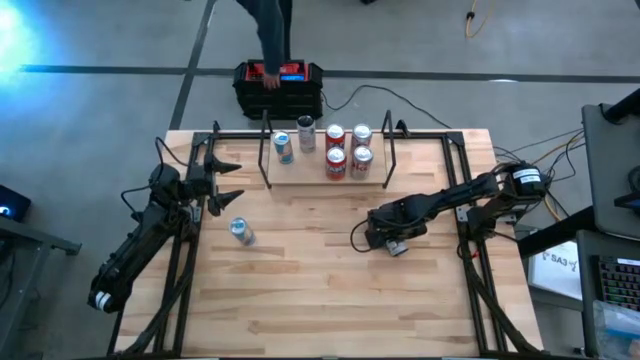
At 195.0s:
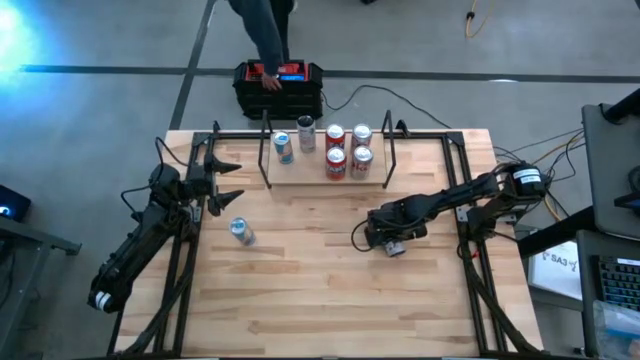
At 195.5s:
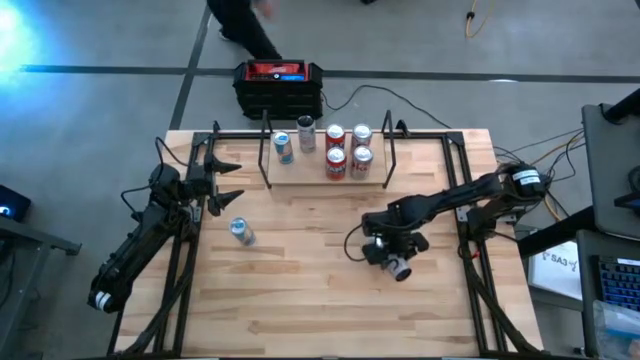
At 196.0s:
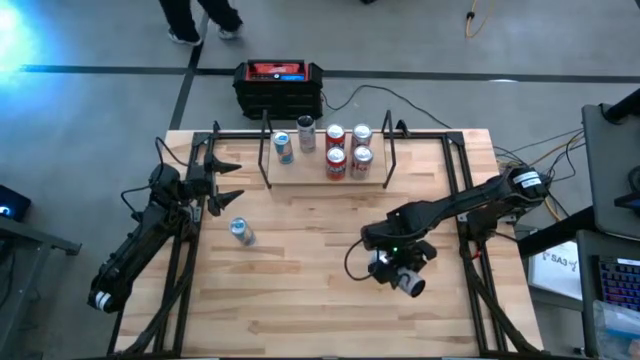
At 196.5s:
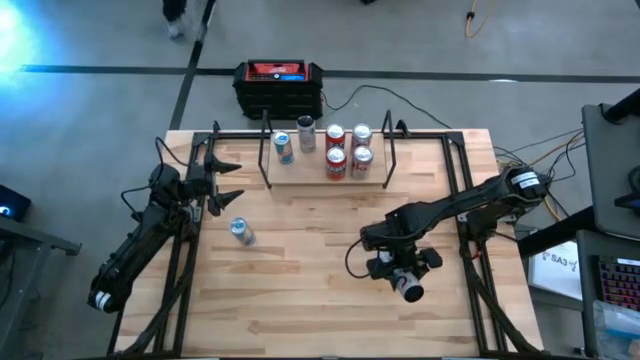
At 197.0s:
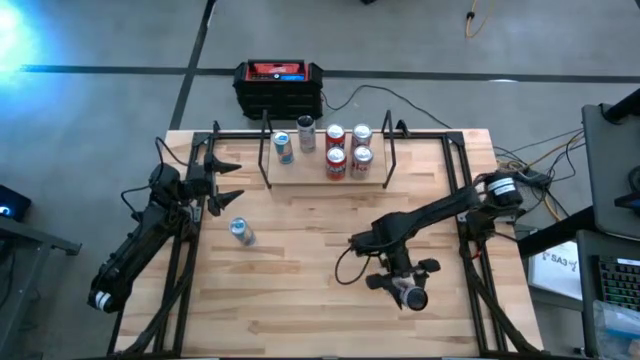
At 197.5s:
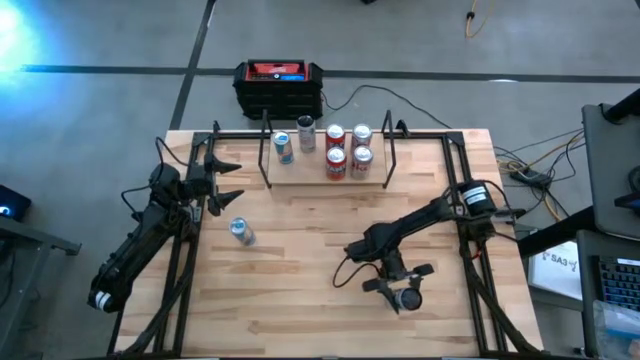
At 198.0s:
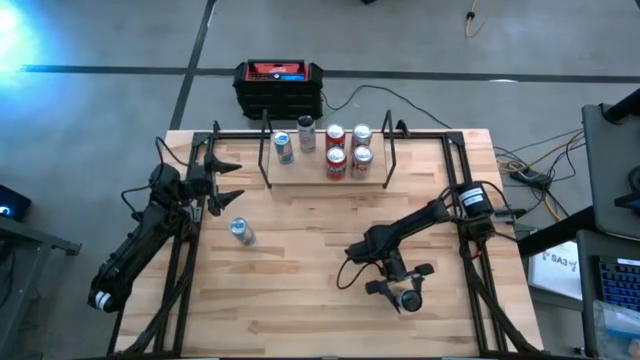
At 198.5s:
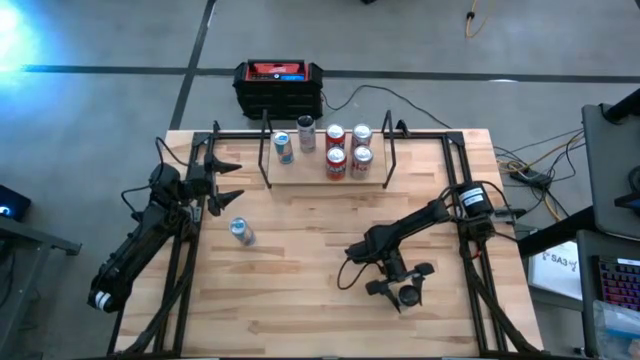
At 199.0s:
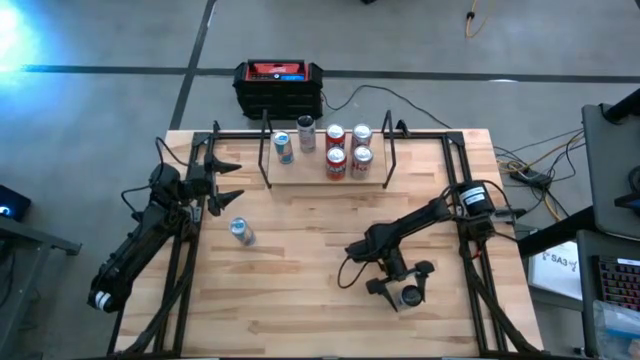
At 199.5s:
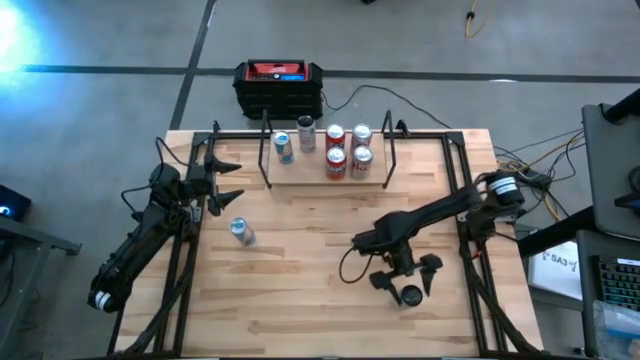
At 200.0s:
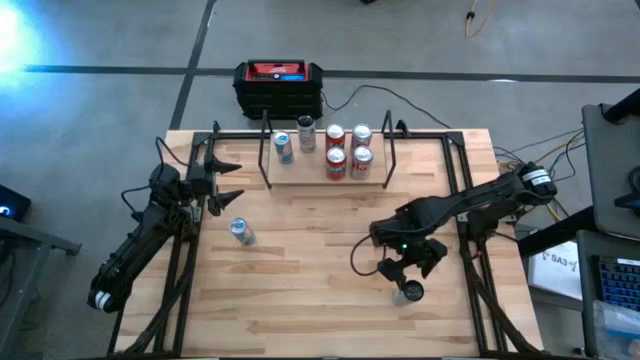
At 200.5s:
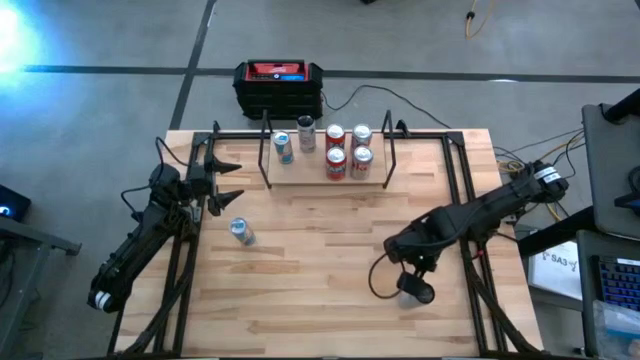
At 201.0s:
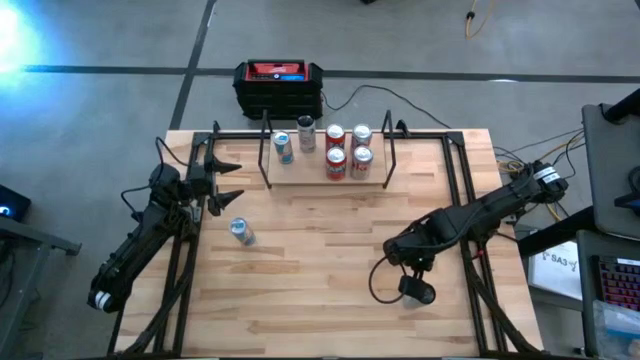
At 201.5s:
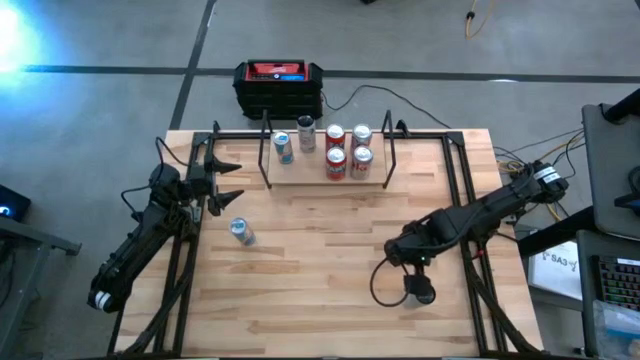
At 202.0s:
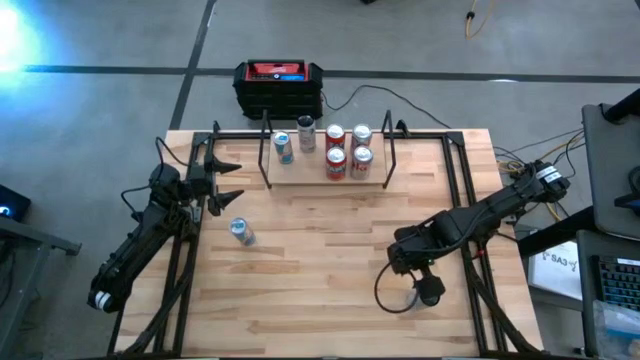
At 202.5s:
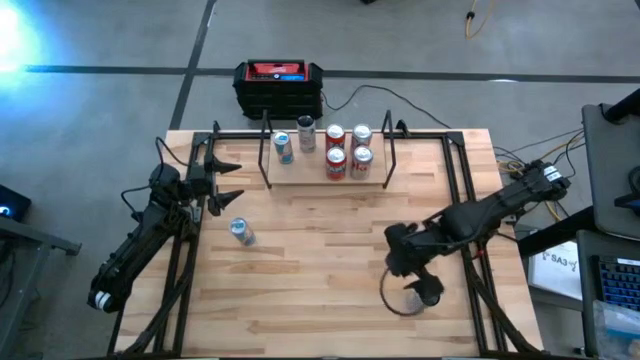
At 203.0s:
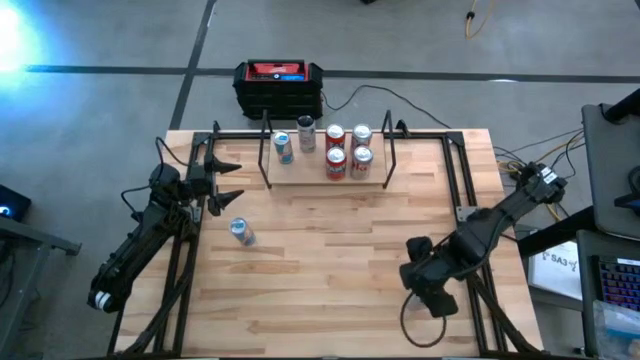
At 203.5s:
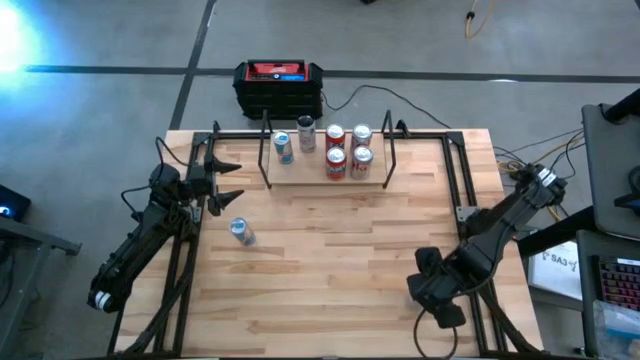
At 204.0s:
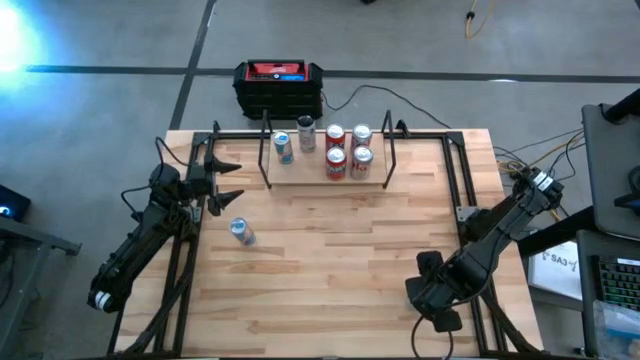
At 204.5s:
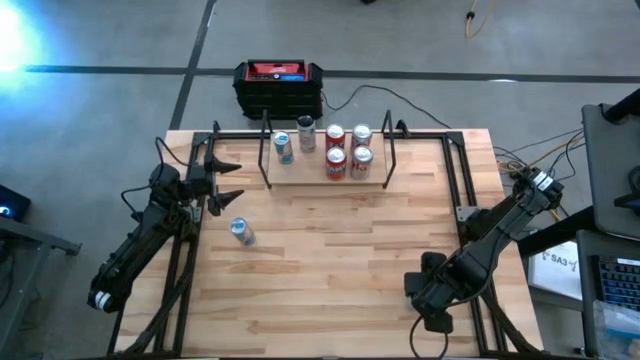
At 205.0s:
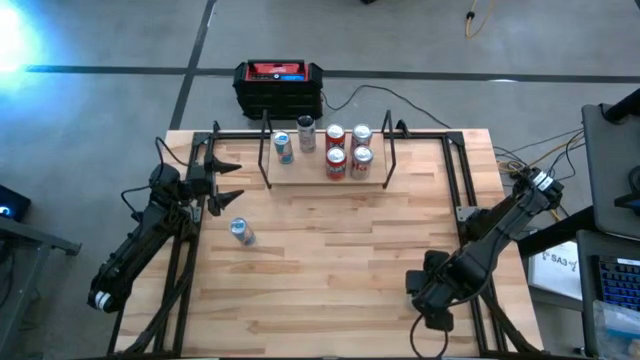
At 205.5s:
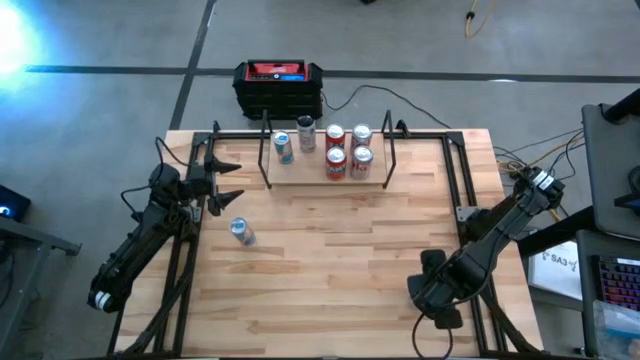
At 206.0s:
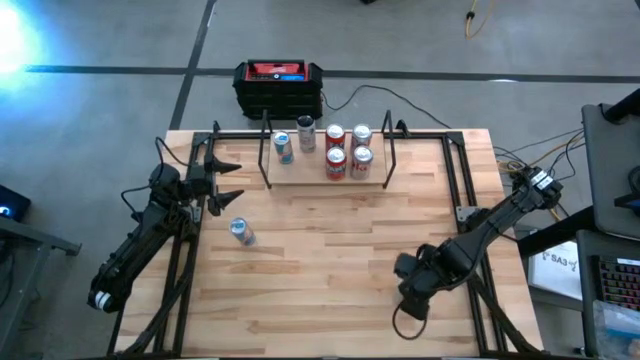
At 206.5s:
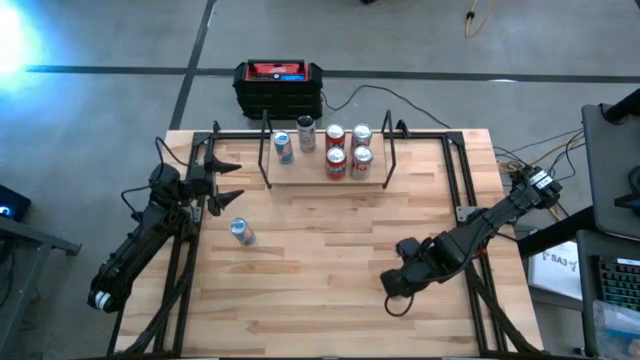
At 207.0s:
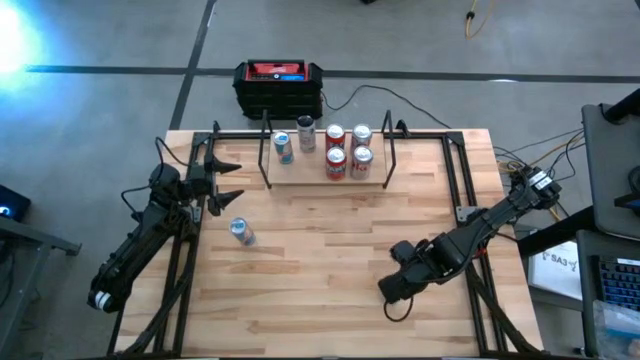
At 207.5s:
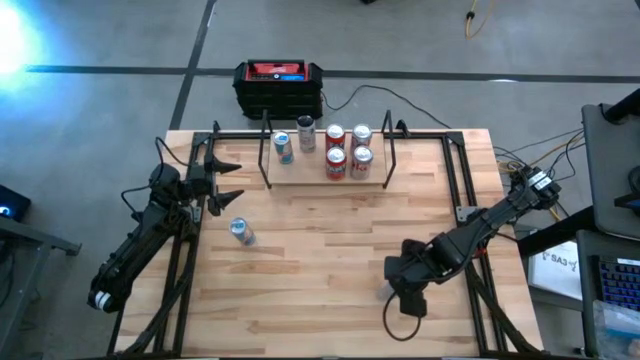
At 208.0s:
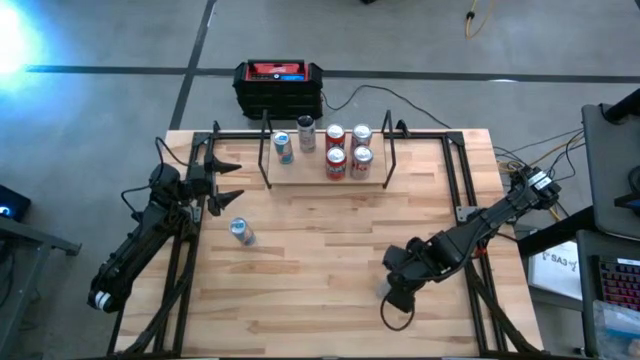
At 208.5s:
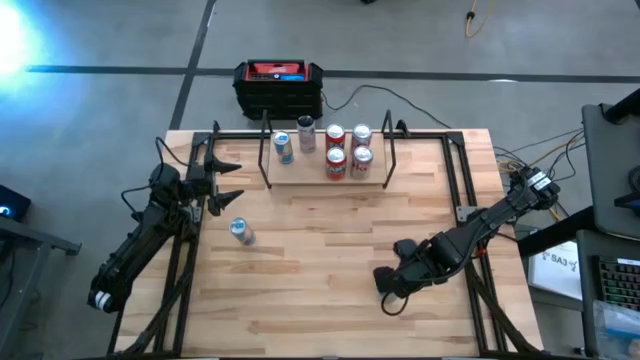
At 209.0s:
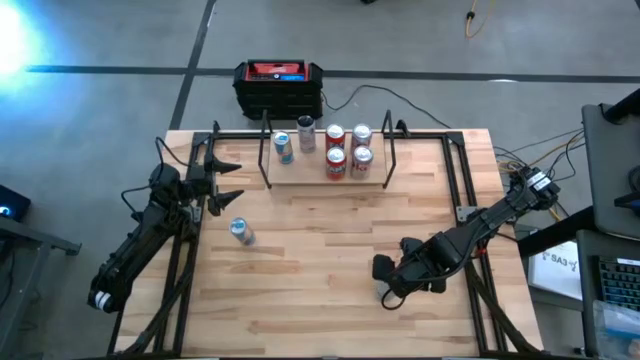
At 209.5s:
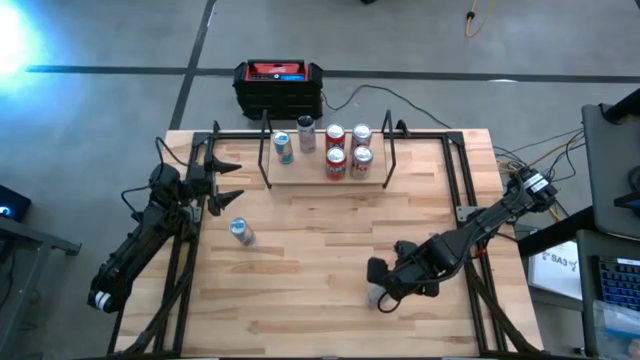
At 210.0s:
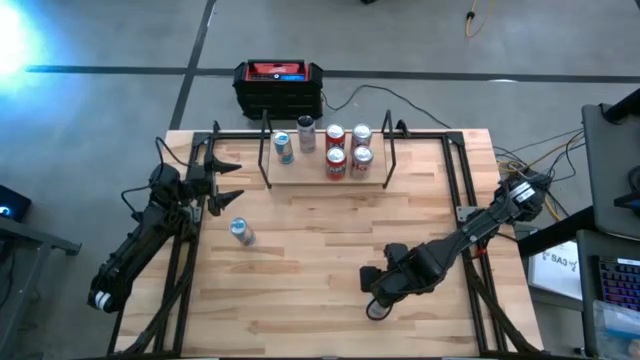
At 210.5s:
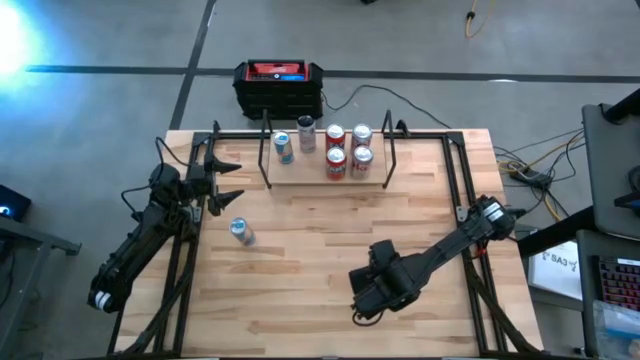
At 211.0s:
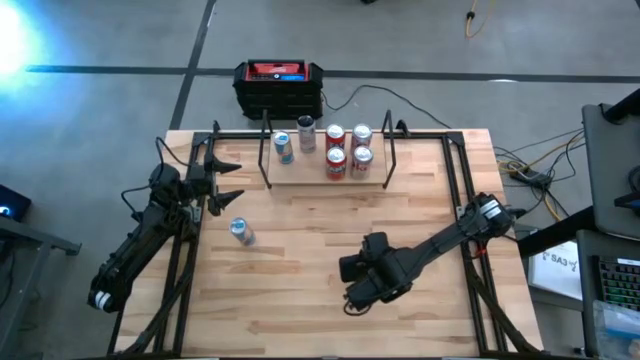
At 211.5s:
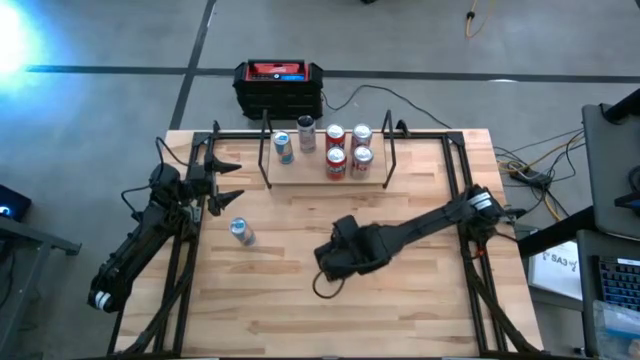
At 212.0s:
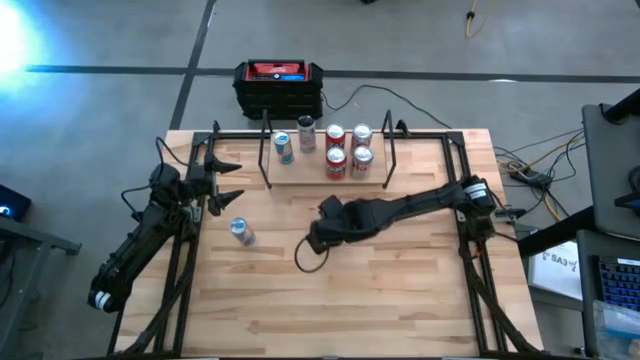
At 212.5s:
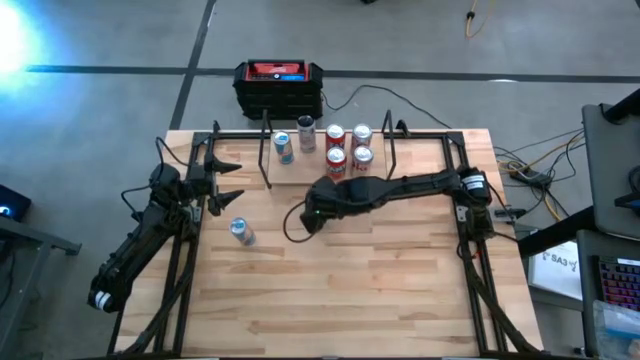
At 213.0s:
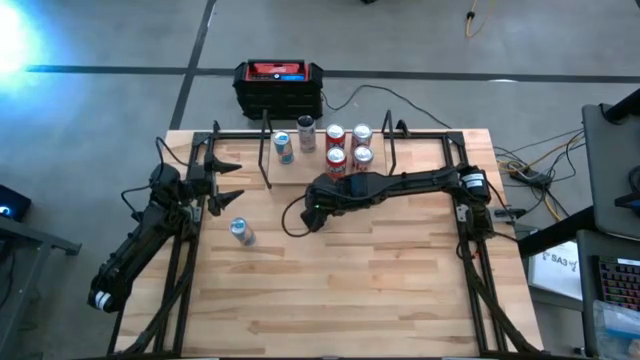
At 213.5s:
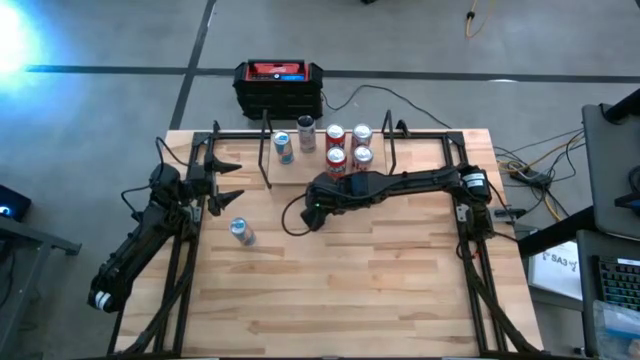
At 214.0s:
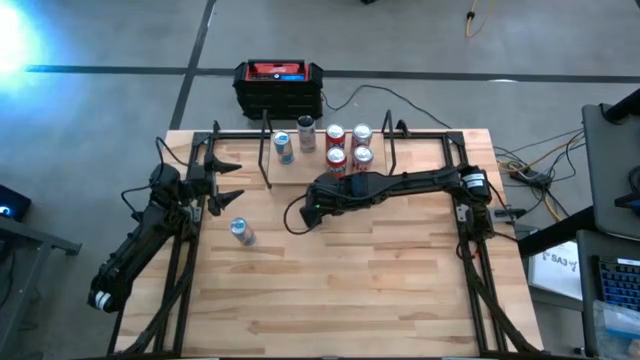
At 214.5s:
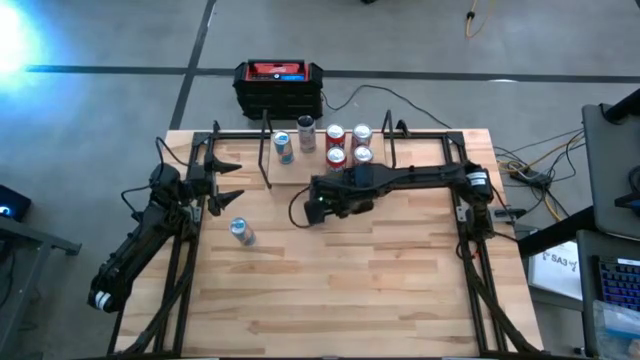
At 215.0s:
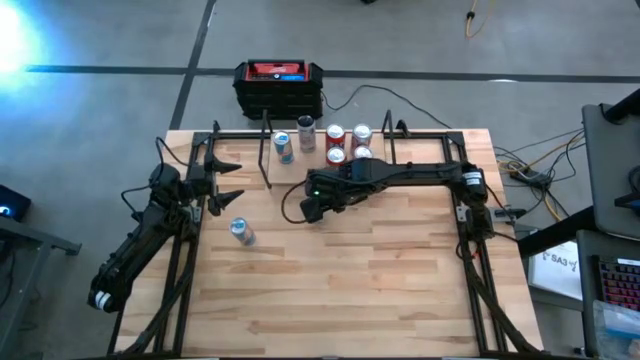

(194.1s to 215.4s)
Task: Place canned beverage on shelf
Put the white and pink soda can on the shelf aligned with the other white and pink soda can

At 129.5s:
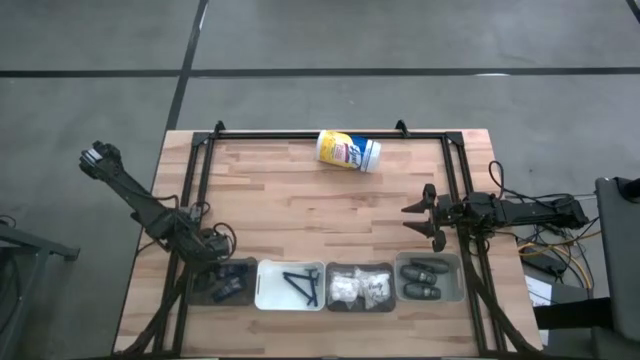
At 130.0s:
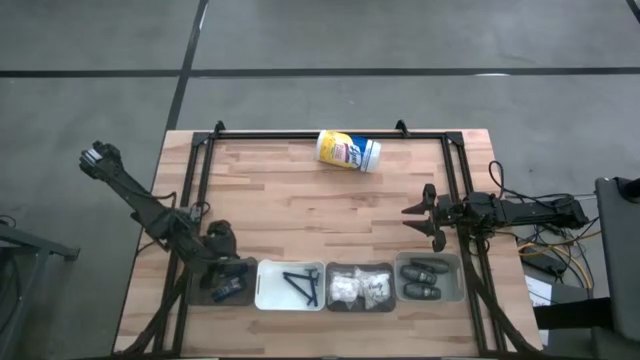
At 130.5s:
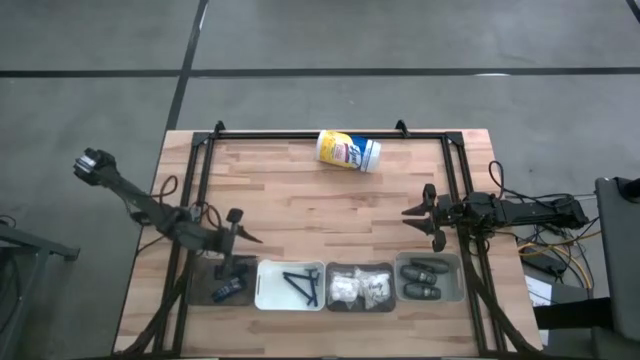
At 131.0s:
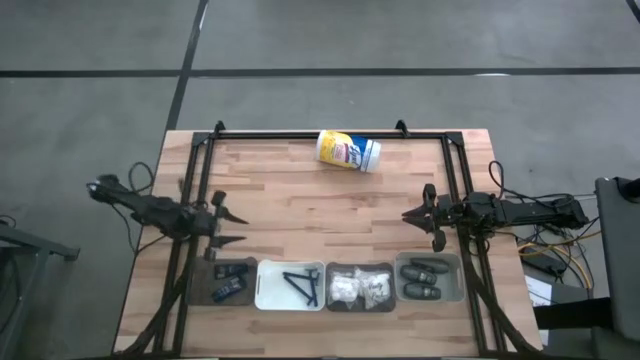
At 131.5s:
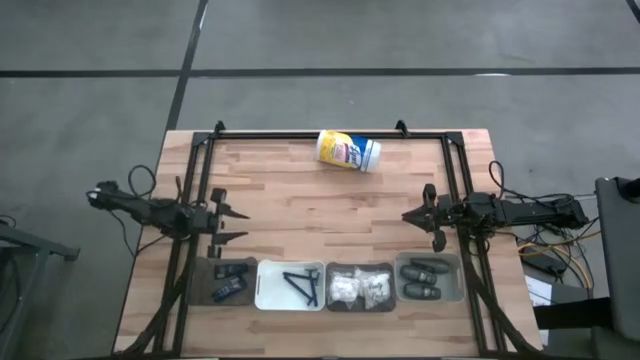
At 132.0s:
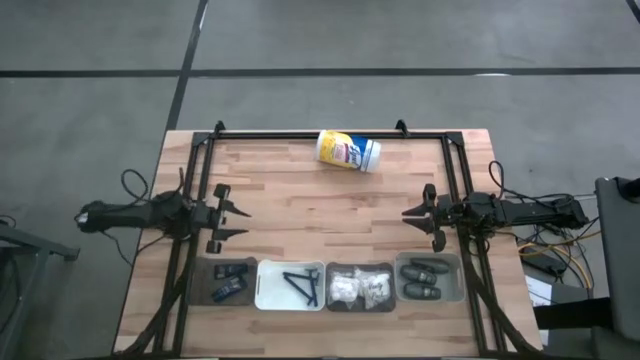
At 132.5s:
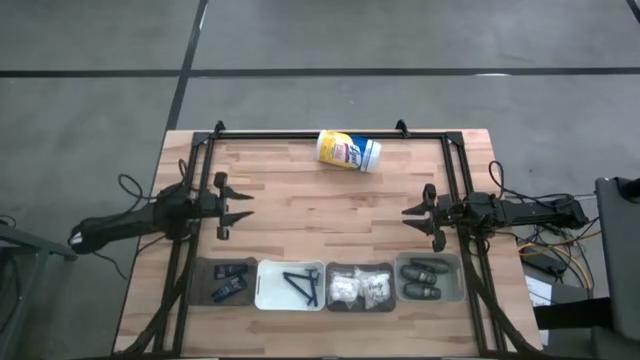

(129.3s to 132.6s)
Task: Pick & Place Travel size toiletries
Return to Home Position
